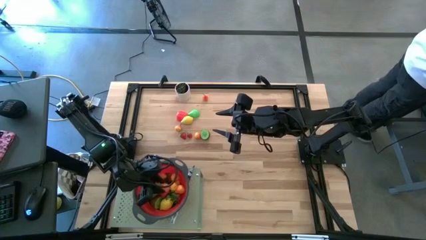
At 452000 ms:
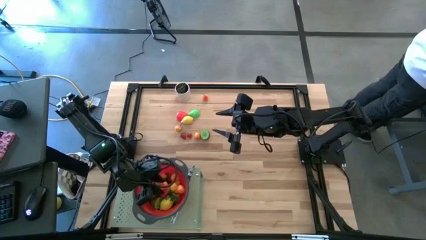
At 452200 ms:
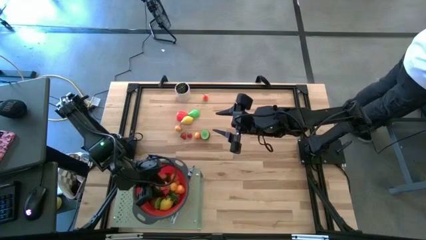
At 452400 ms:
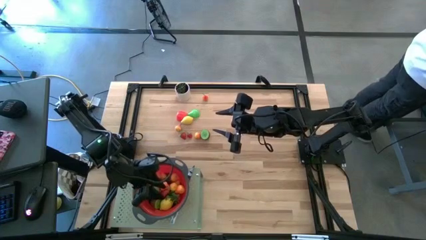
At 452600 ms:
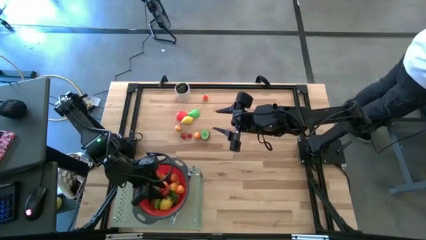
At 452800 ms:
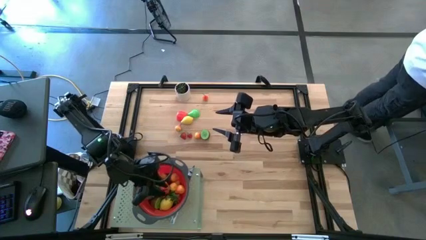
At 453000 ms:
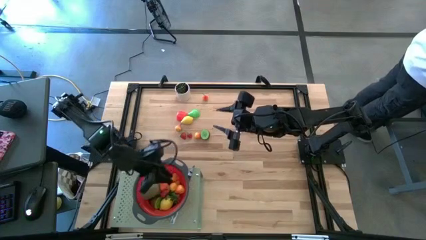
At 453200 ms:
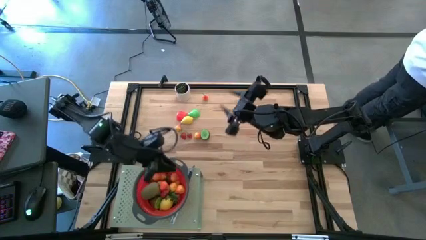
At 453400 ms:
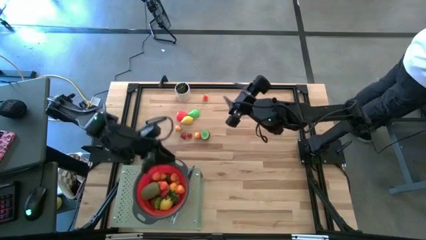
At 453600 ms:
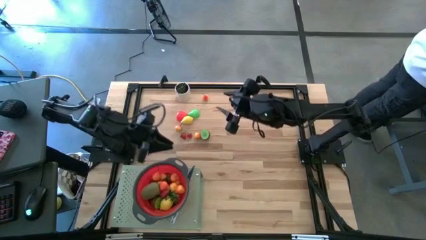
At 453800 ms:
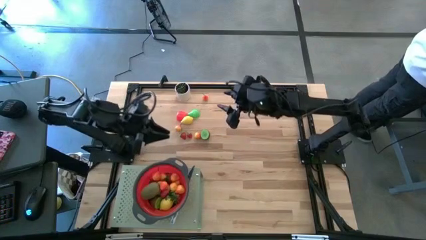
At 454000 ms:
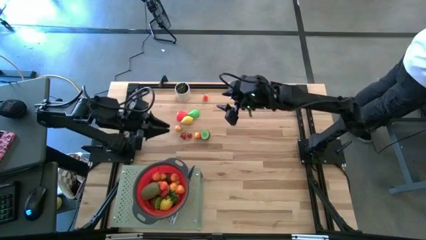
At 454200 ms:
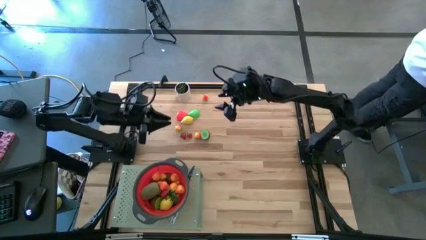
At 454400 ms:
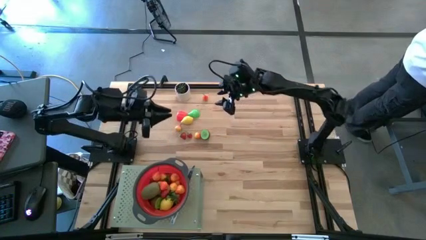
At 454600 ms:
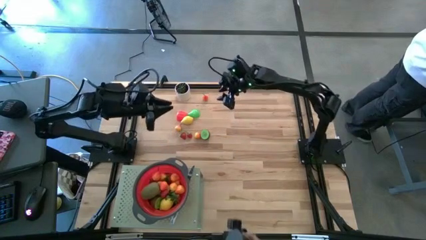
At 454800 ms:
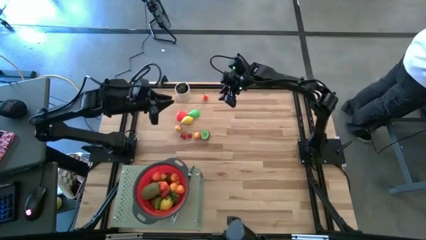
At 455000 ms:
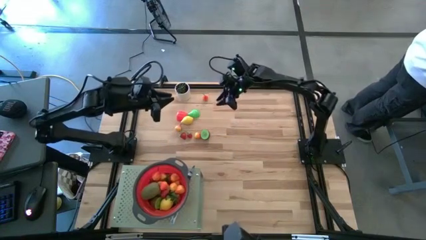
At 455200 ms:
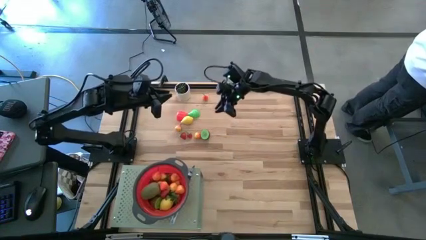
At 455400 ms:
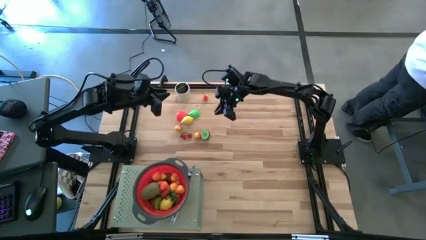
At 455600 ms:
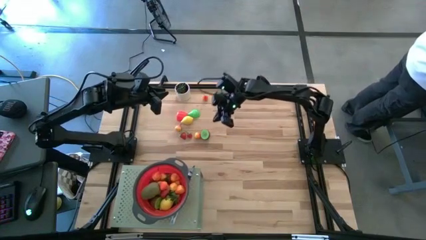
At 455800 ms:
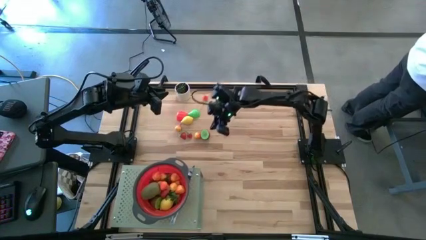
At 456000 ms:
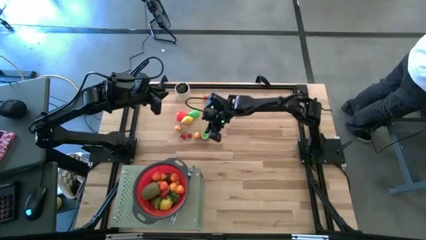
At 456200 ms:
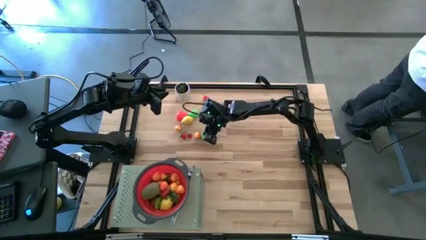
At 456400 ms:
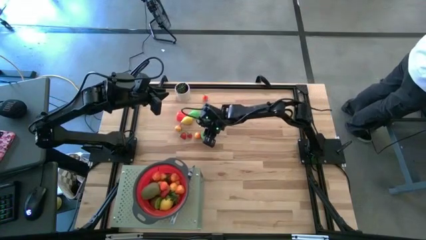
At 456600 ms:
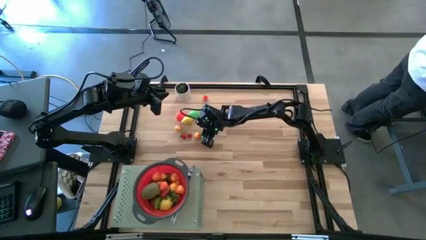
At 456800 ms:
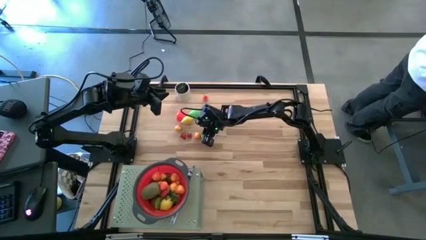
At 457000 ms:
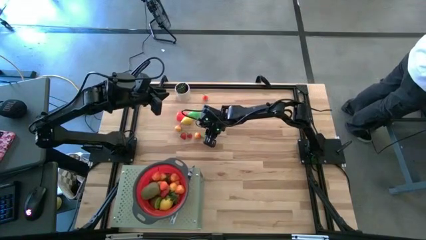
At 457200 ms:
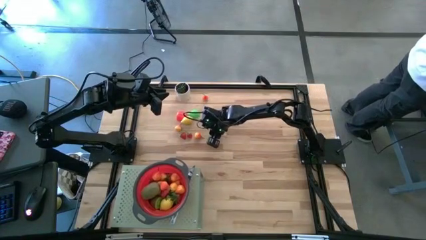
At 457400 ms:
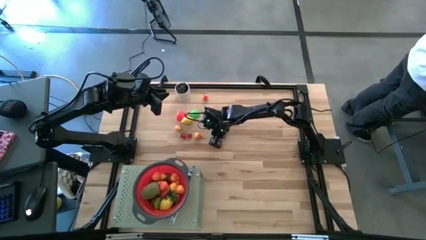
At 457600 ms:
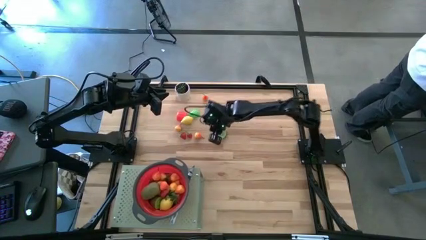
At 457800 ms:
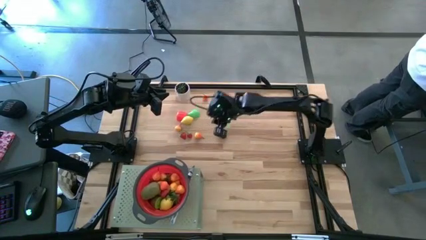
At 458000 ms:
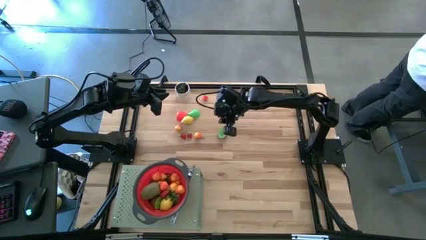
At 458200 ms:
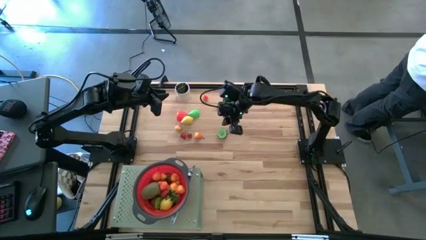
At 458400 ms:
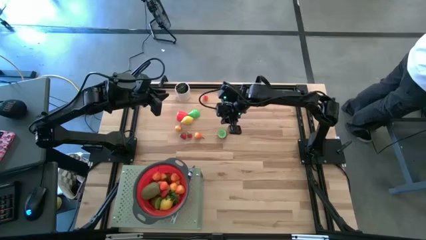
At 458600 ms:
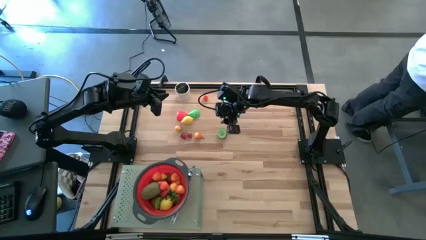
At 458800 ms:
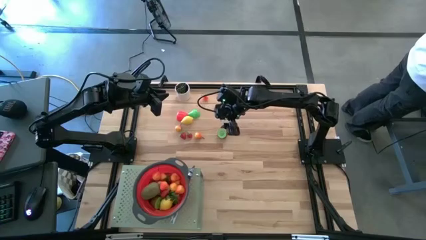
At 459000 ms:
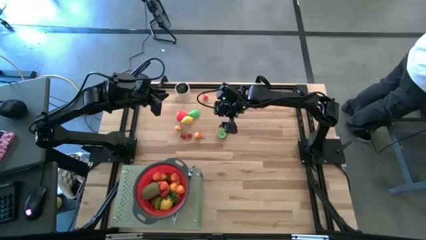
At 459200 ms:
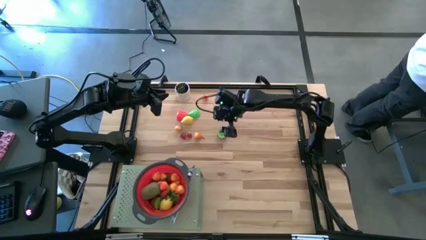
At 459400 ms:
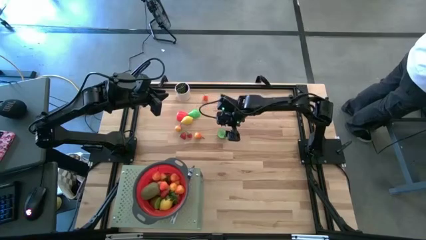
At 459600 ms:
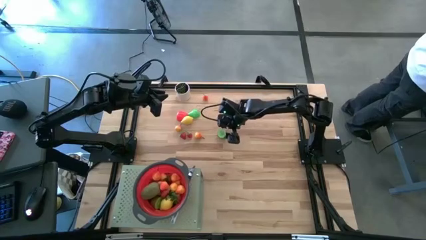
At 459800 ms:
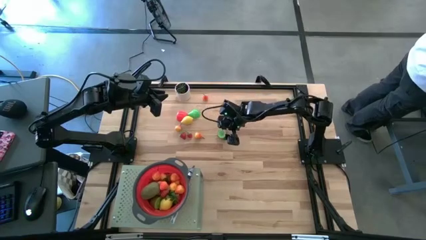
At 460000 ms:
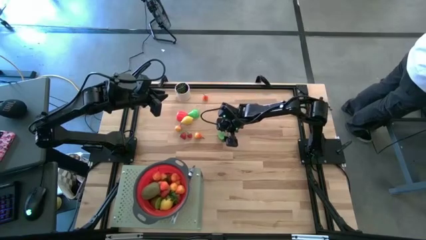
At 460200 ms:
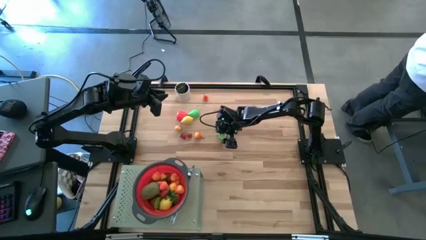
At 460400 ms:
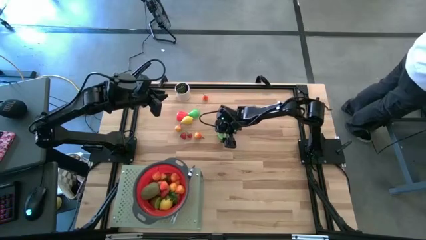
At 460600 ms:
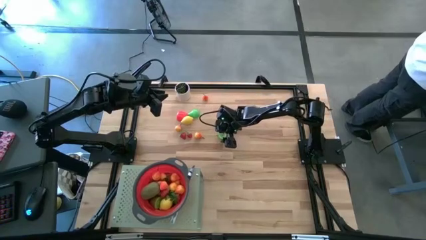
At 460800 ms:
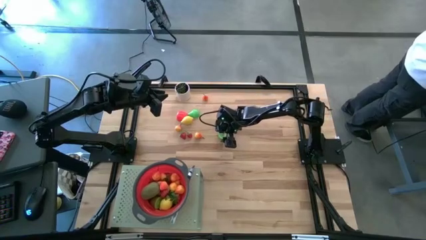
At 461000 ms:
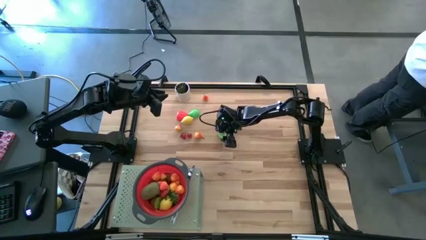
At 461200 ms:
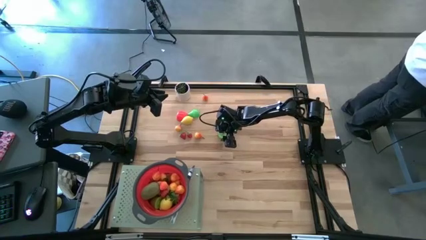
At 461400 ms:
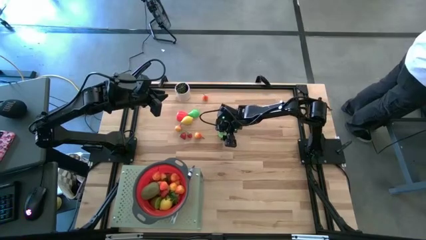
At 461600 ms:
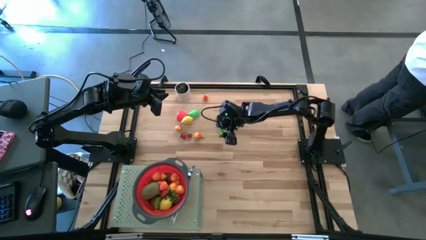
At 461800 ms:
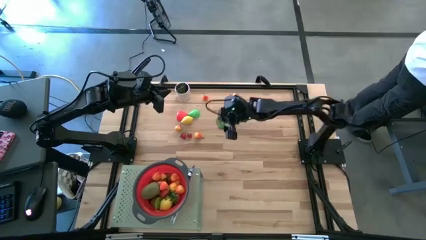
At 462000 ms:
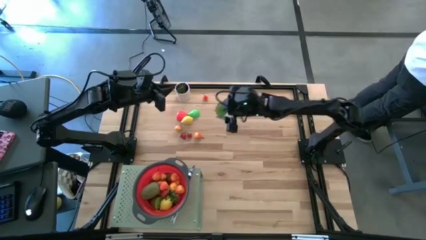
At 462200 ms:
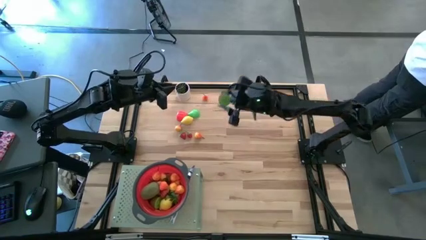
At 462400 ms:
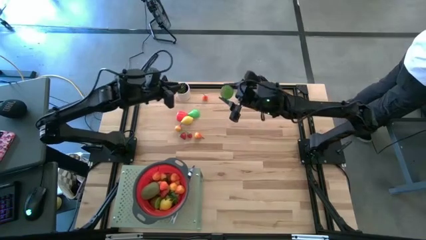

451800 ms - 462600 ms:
Task: Pick & Place Fruit
Put the half kiwi into the red strainer bowl on the shelf

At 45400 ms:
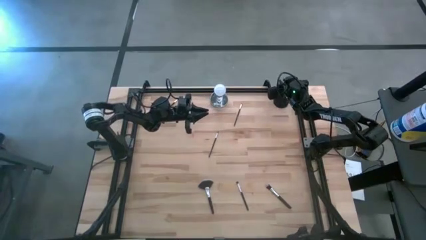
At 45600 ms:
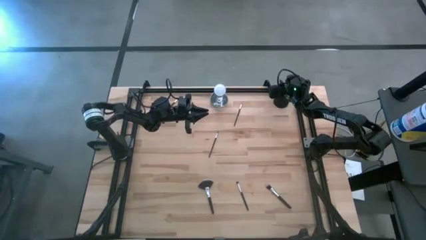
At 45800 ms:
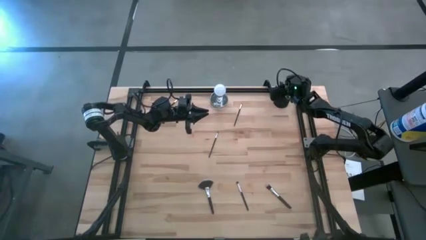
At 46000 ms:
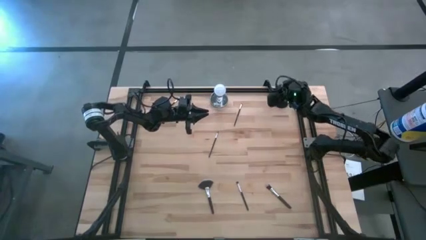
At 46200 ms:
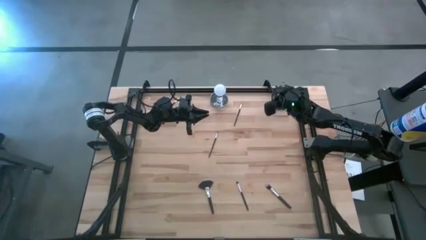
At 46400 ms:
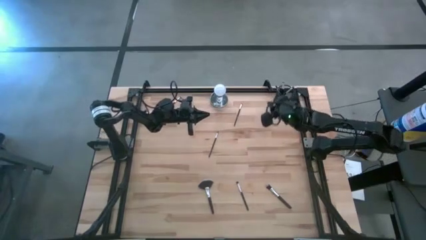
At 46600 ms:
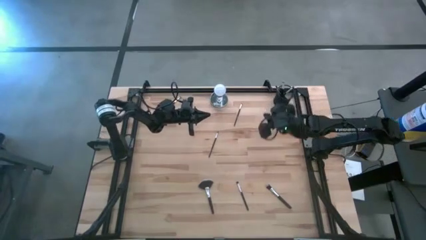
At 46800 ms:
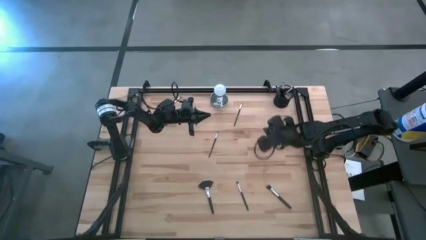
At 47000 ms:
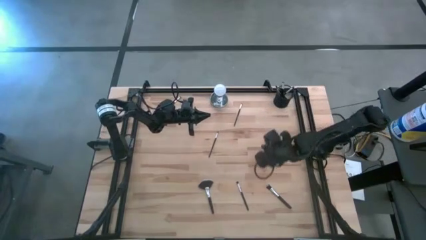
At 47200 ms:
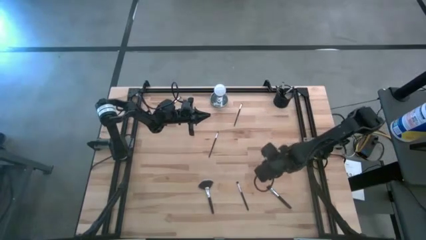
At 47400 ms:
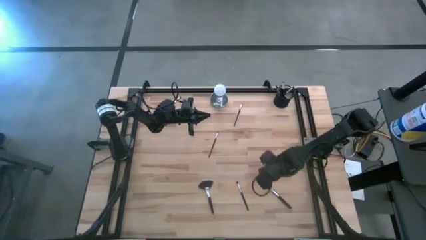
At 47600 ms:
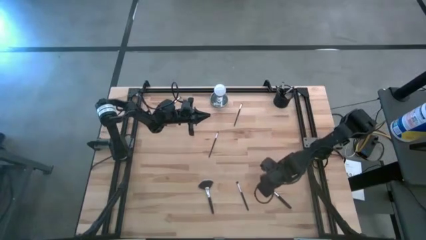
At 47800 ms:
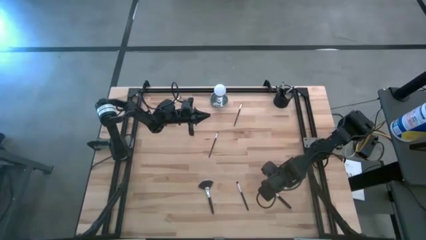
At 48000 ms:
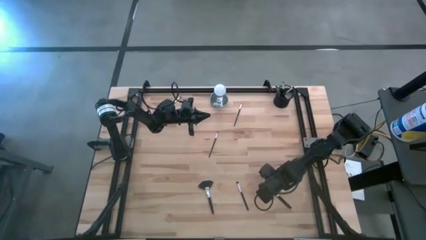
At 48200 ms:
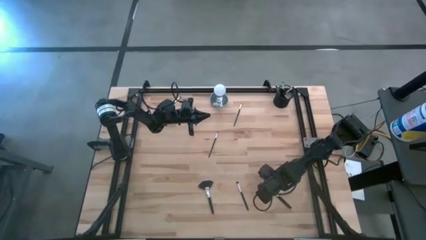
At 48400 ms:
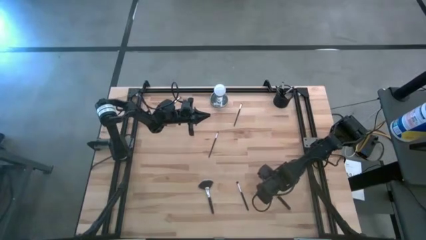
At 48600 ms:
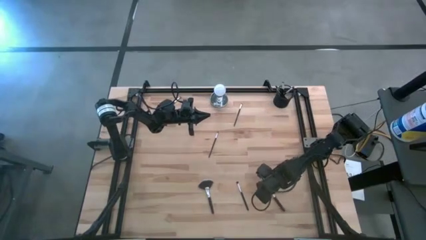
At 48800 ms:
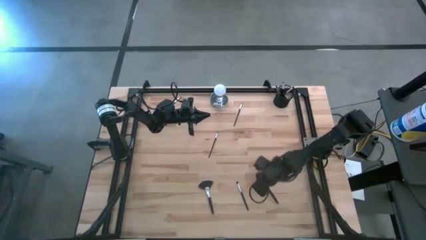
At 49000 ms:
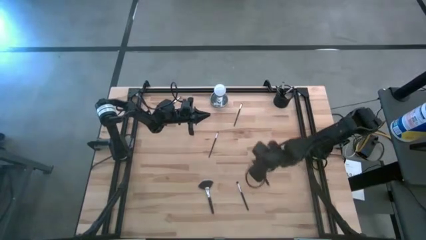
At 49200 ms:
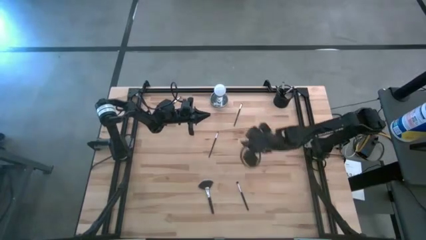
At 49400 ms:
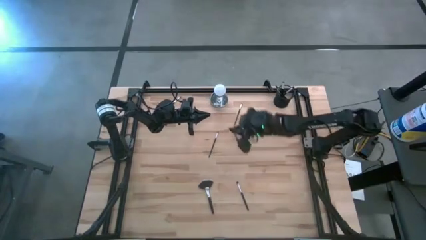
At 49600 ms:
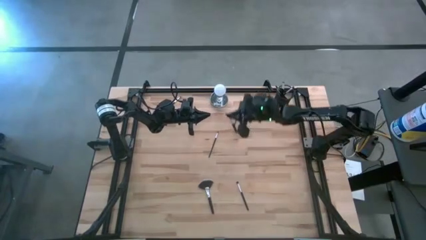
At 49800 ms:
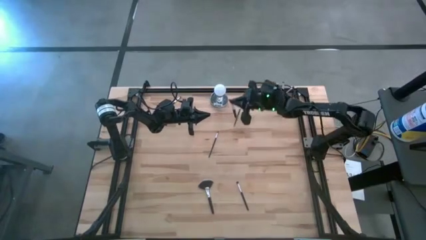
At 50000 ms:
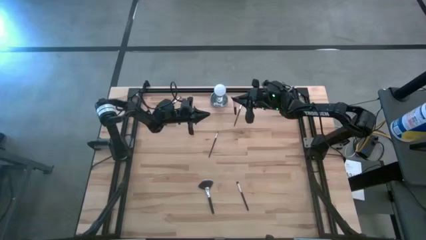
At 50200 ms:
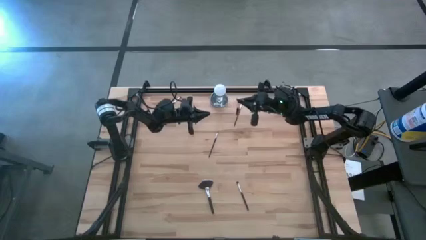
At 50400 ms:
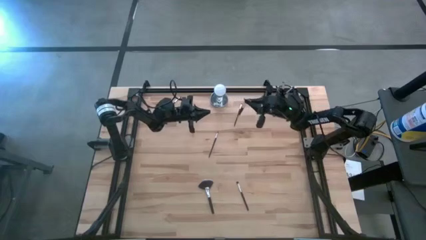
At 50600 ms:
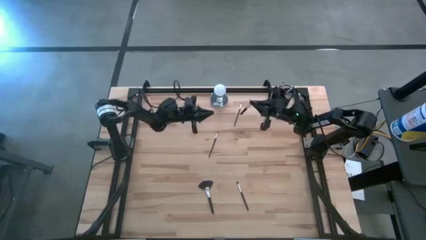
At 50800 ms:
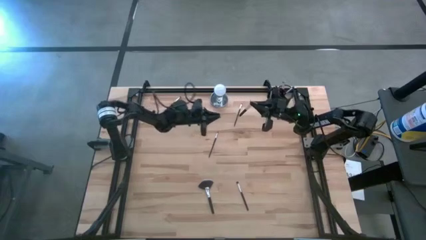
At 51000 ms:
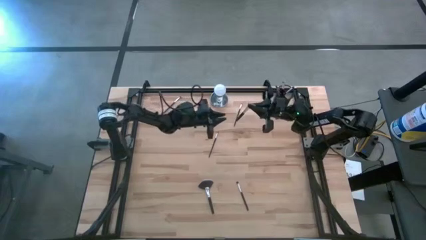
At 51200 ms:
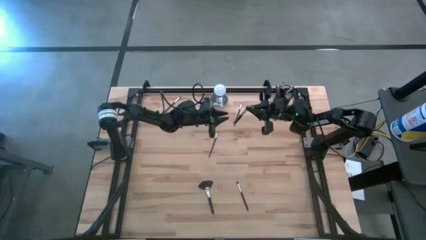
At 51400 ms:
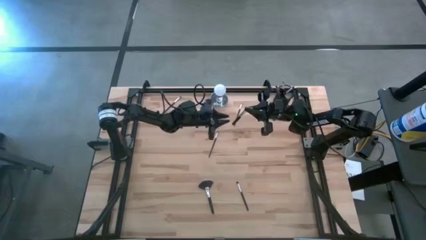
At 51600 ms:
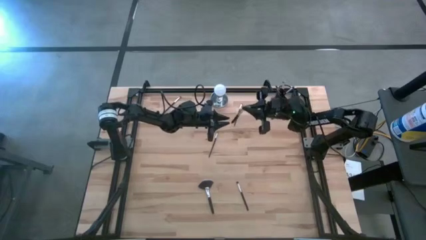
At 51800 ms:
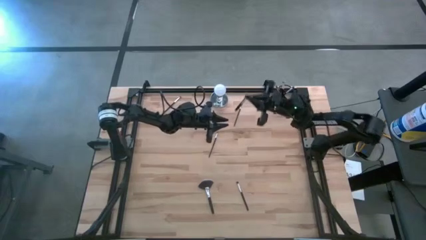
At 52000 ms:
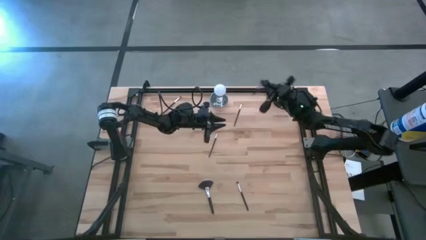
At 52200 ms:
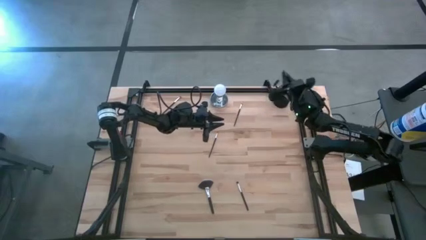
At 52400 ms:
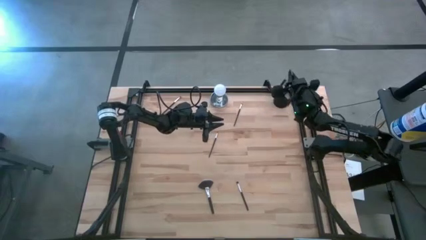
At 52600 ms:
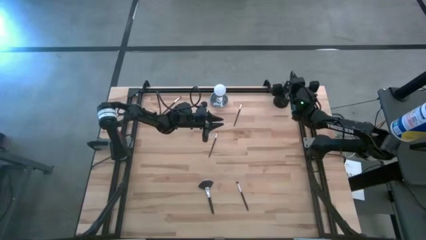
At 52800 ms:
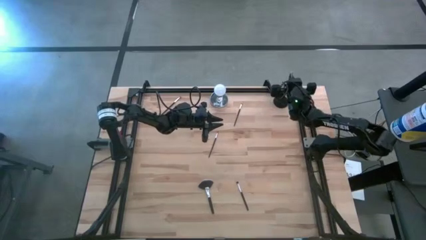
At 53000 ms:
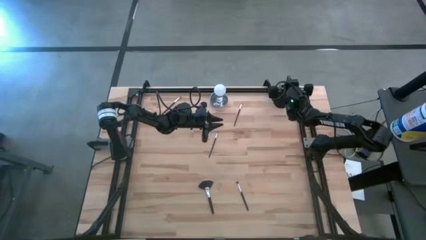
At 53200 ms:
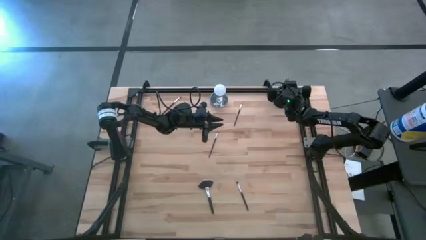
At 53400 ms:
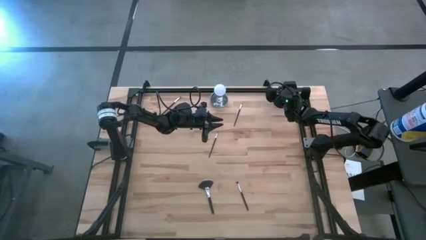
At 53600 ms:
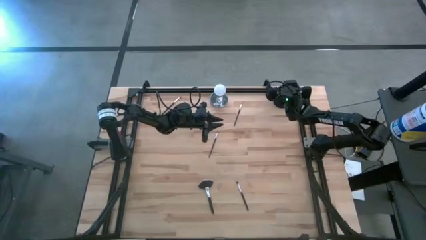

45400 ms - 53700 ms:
Task: Pick & Place Makeup Supplies
Put the makeup brush into the makeup holder
